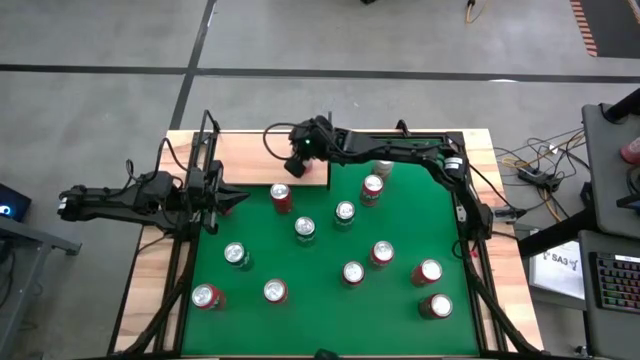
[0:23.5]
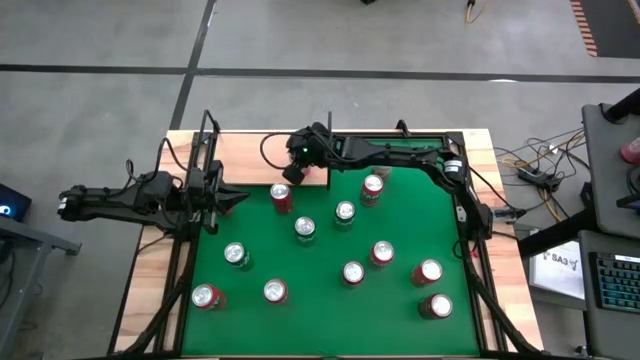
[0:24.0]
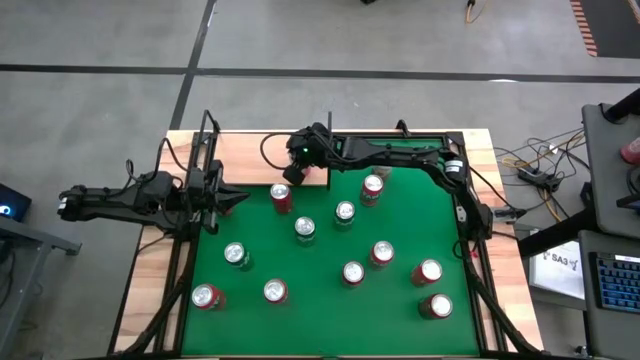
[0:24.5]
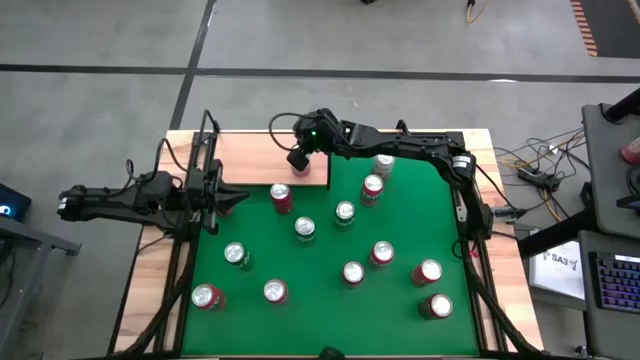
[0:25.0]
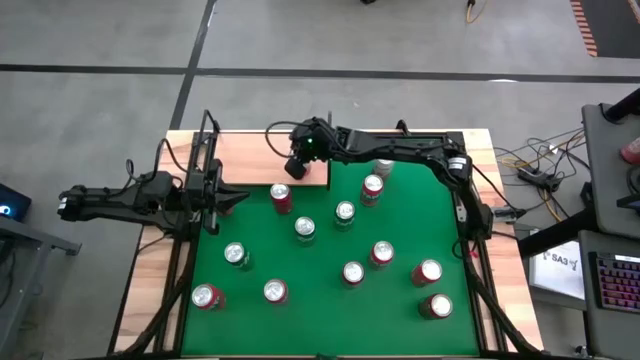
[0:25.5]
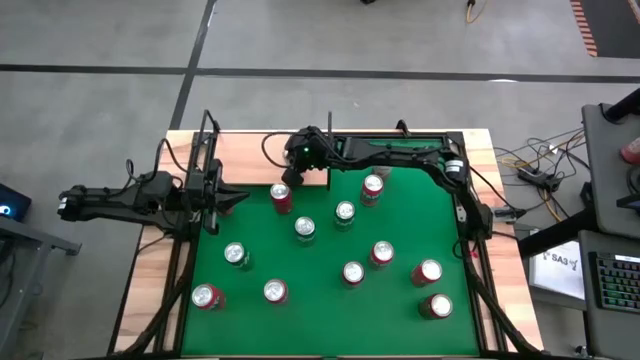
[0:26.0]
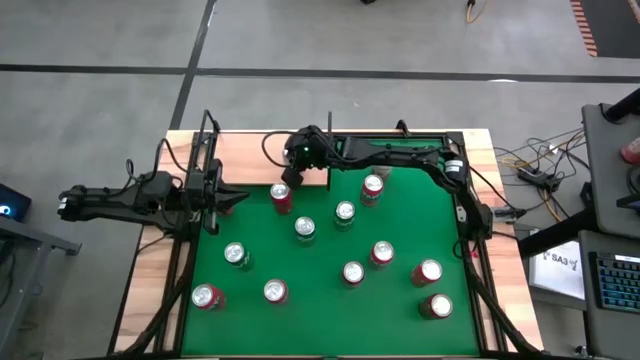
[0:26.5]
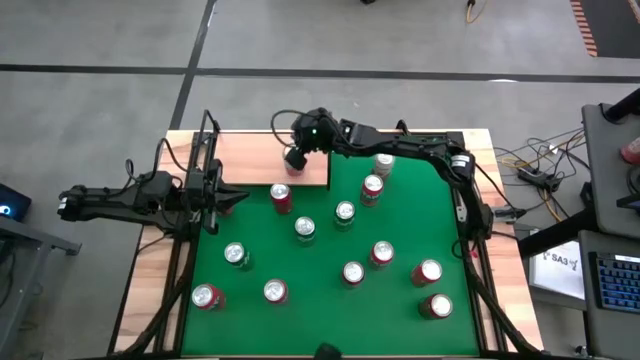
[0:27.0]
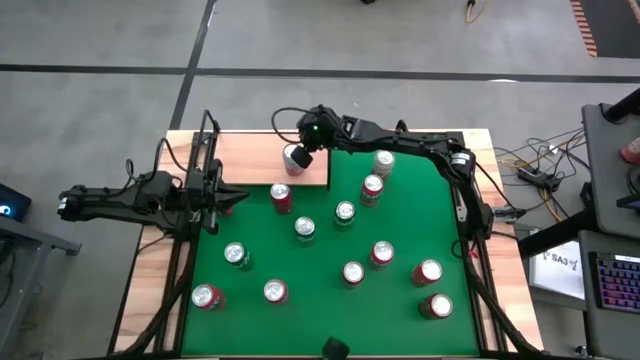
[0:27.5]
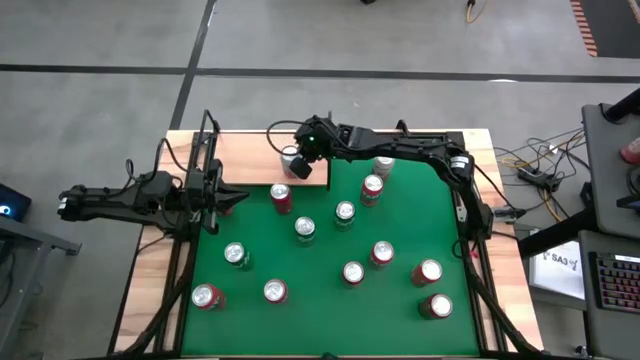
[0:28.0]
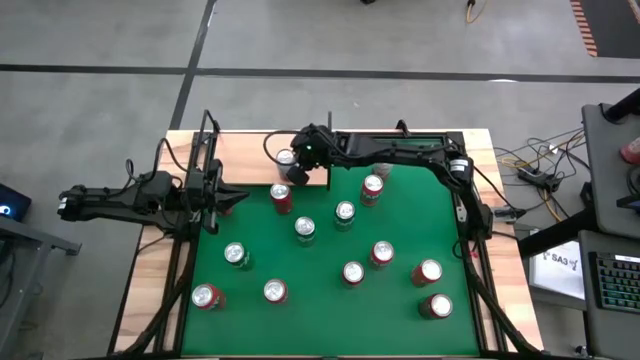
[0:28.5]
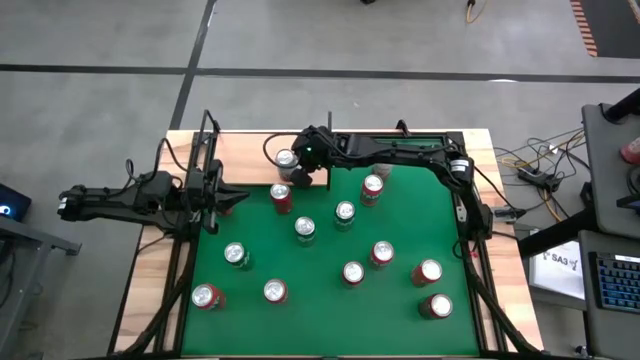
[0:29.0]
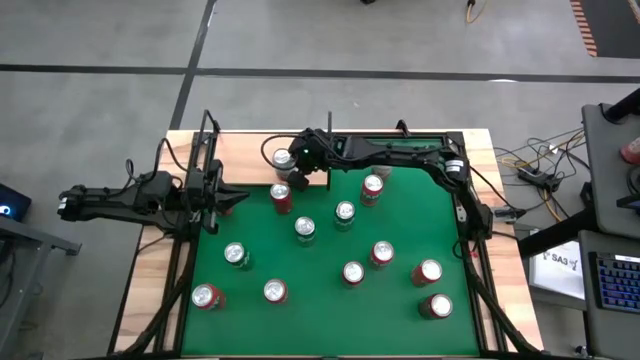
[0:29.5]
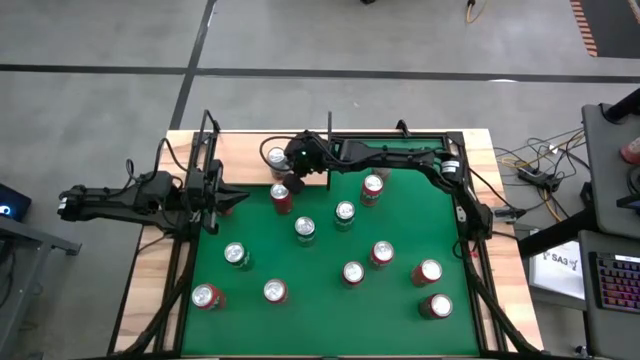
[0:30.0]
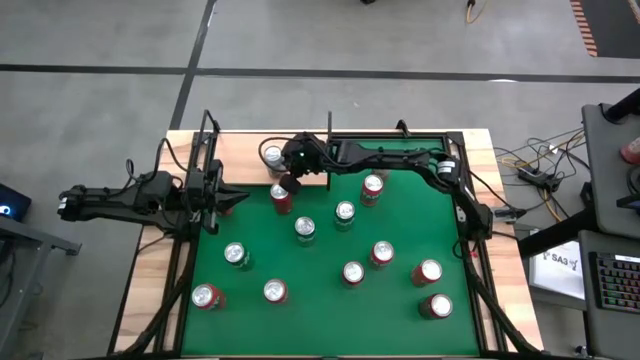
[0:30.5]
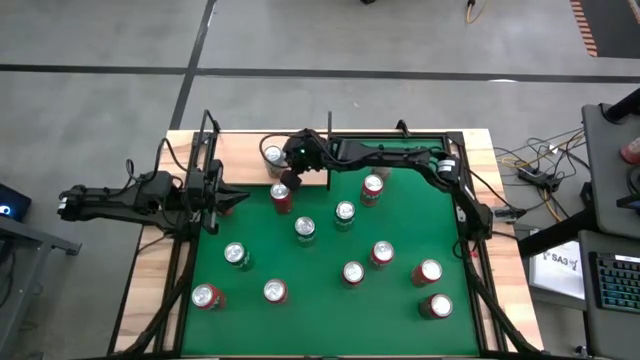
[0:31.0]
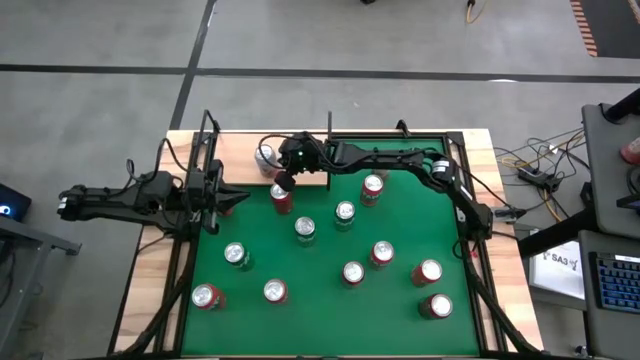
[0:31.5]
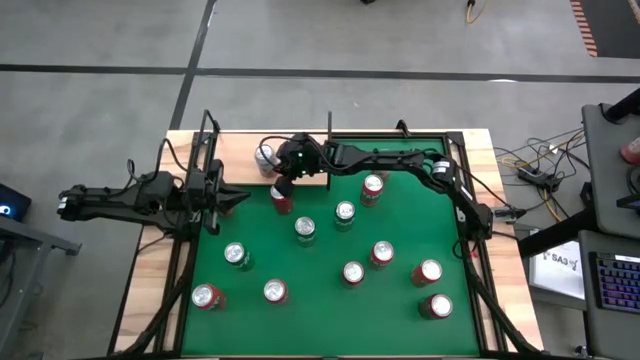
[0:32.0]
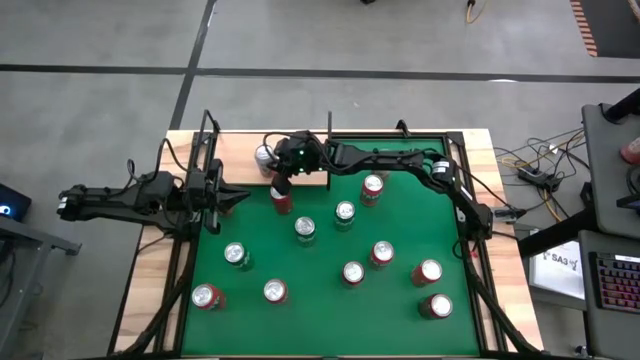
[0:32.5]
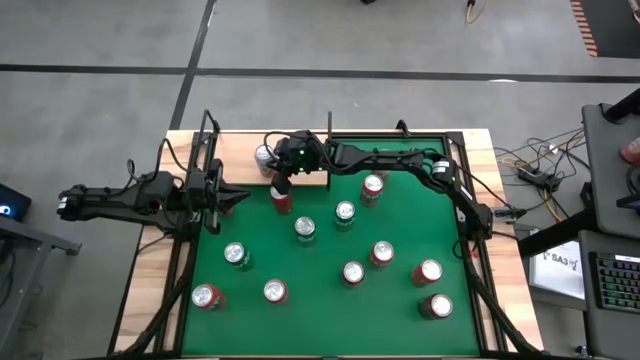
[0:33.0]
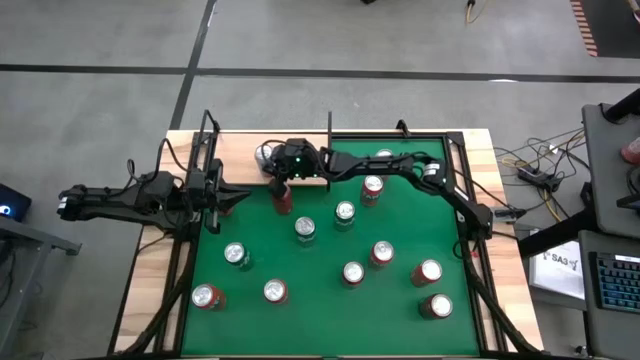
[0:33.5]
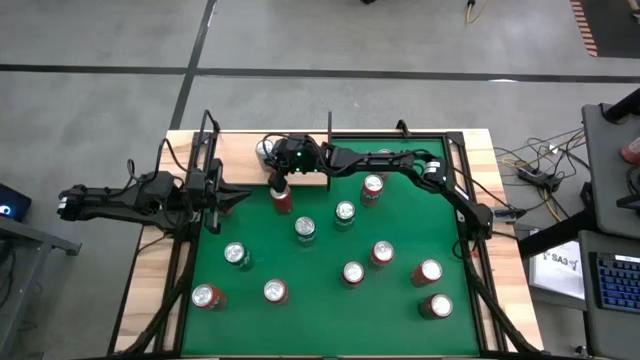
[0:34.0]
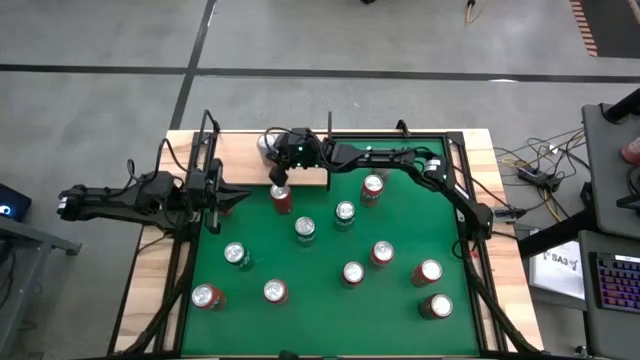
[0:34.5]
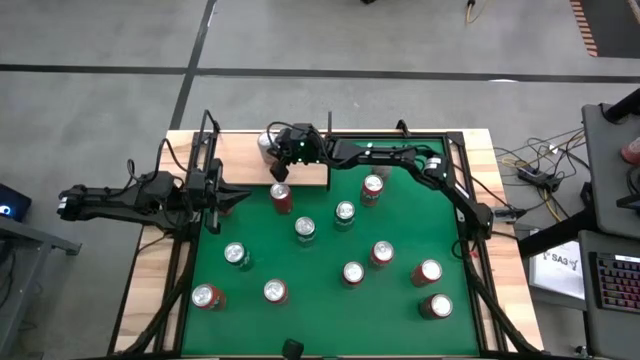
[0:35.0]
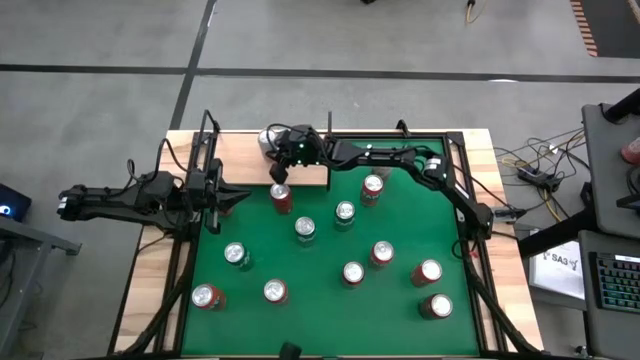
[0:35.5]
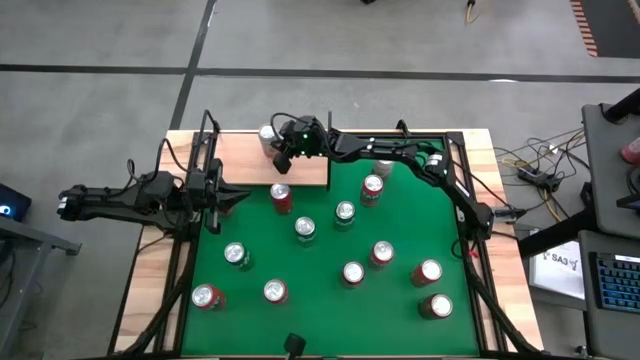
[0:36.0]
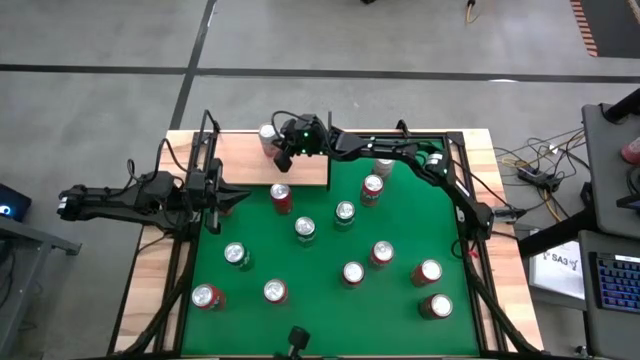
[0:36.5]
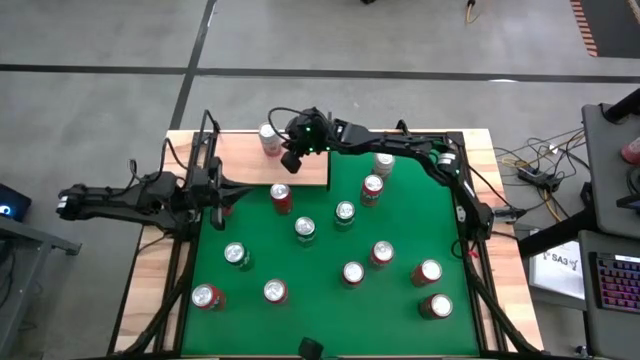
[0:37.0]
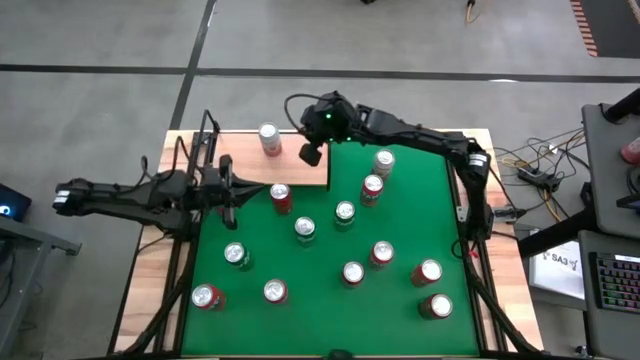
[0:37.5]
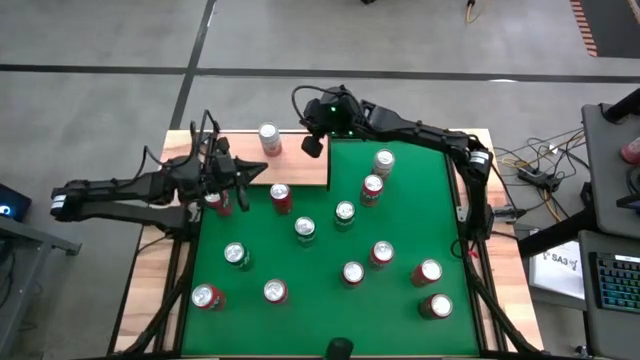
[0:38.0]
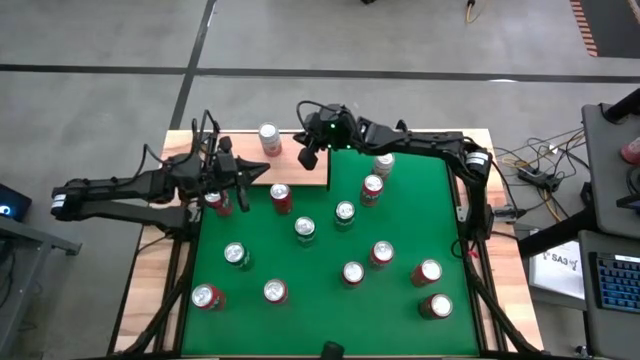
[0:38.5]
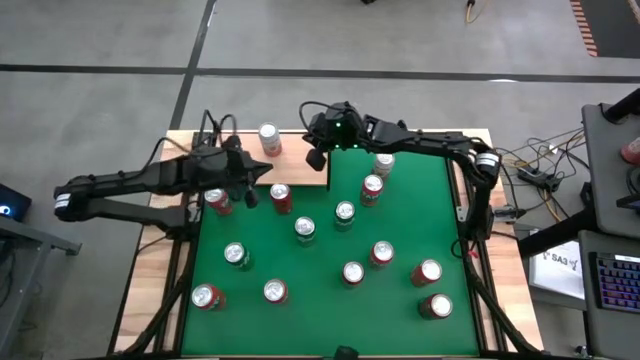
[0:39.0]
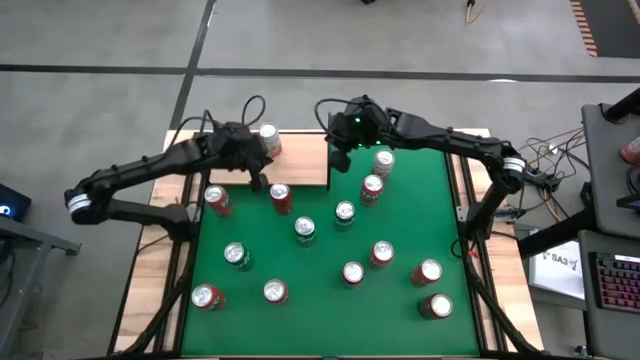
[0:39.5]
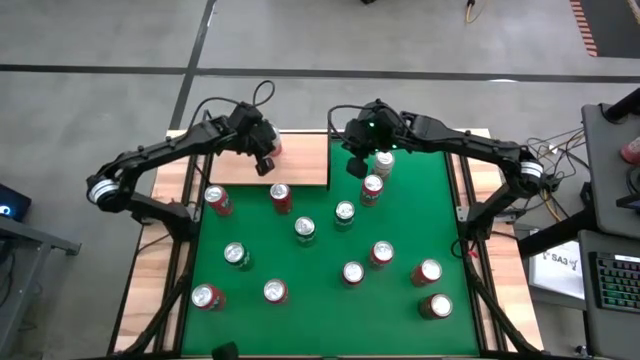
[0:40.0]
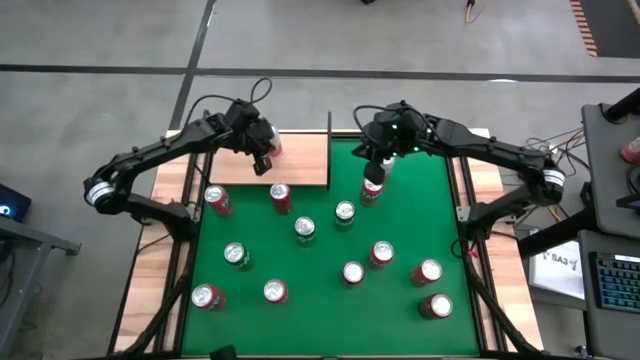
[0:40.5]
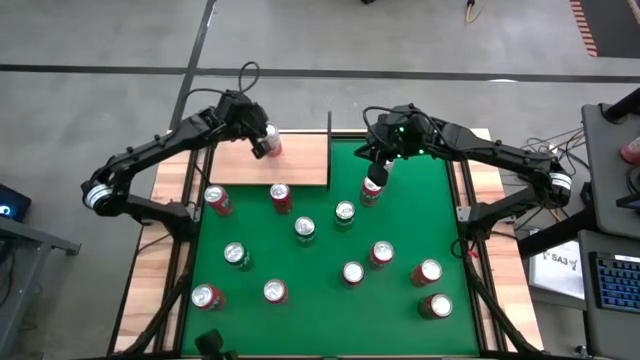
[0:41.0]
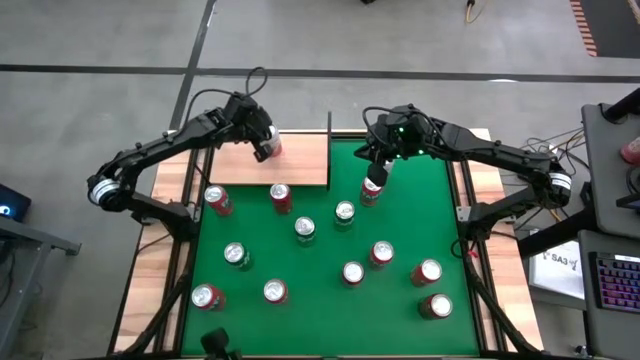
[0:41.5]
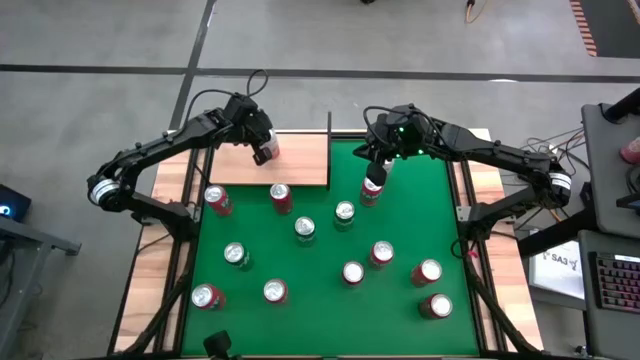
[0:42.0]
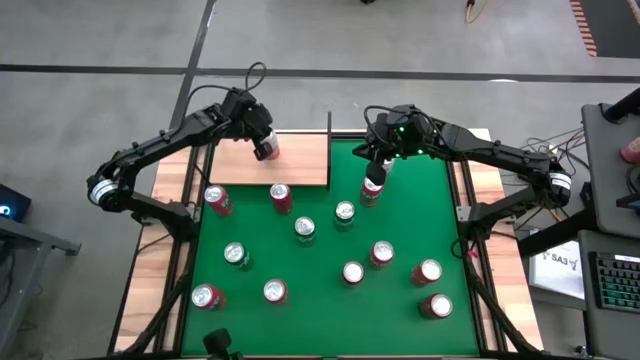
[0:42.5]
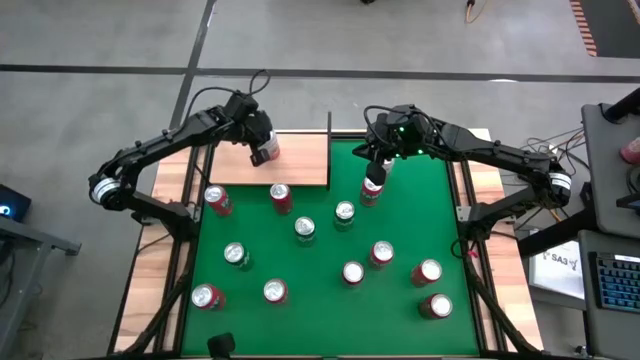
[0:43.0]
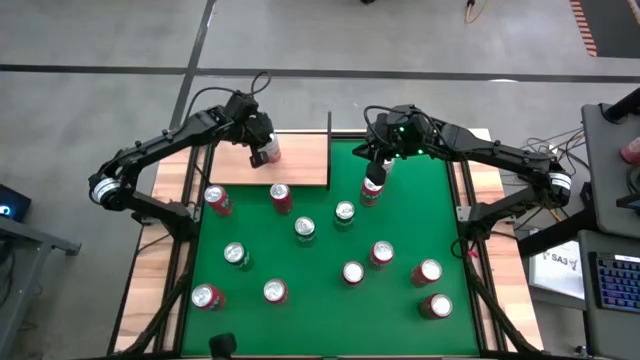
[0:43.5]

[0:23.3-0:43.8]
Task: Place canned beverage on shelf
Put the pink-white soda can on the shelf
